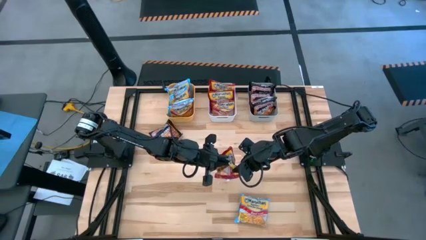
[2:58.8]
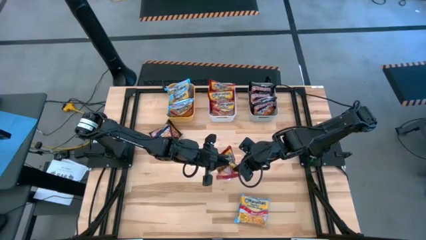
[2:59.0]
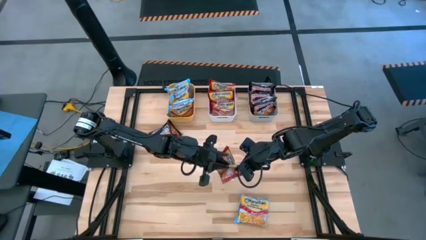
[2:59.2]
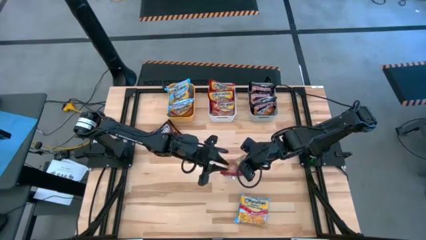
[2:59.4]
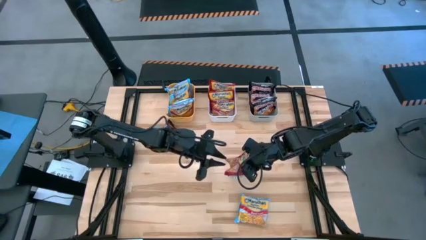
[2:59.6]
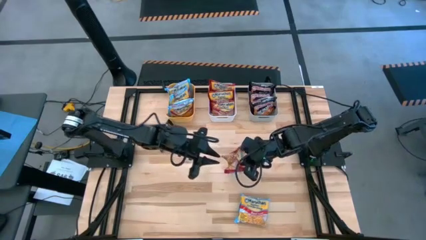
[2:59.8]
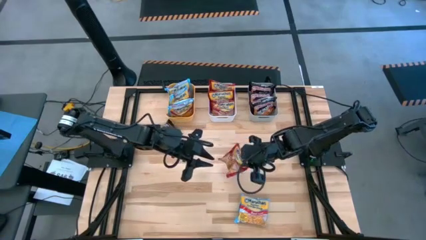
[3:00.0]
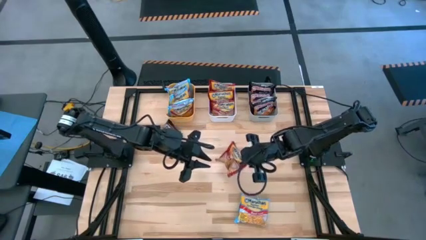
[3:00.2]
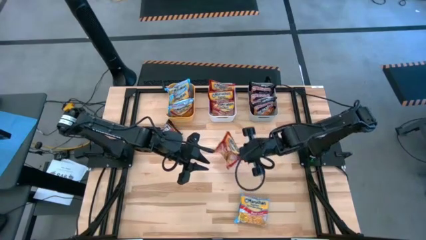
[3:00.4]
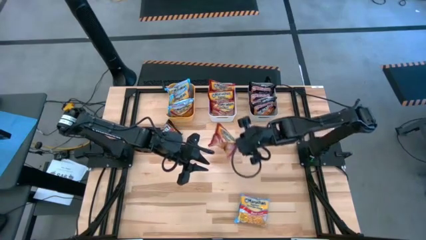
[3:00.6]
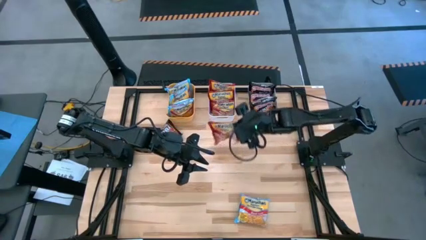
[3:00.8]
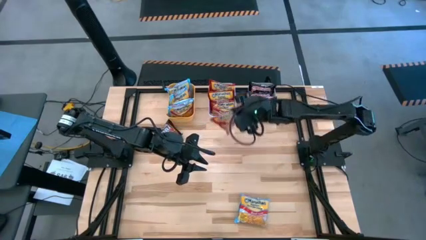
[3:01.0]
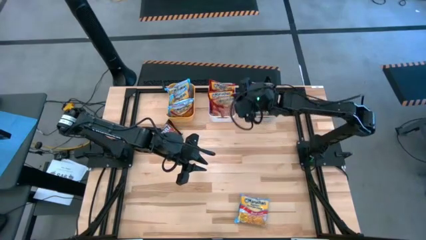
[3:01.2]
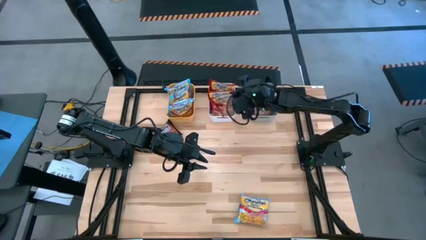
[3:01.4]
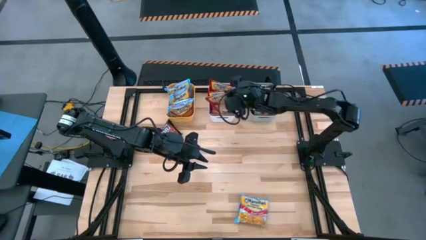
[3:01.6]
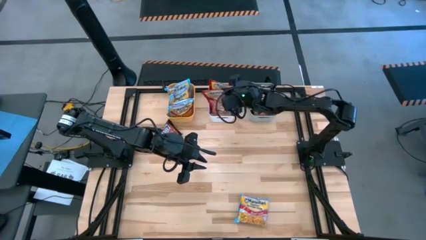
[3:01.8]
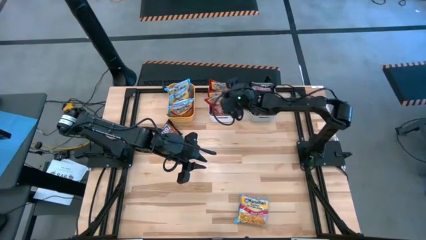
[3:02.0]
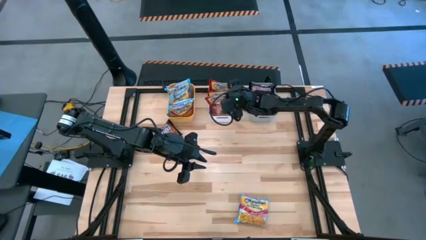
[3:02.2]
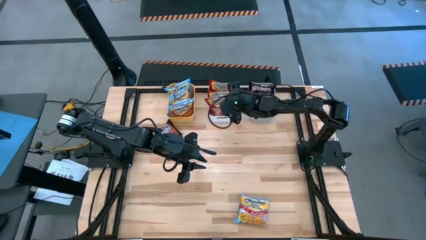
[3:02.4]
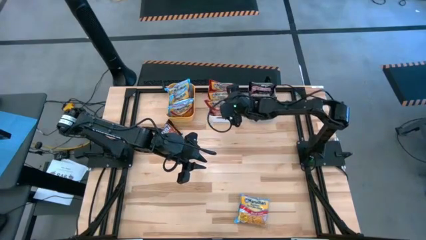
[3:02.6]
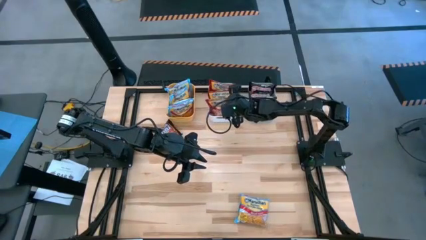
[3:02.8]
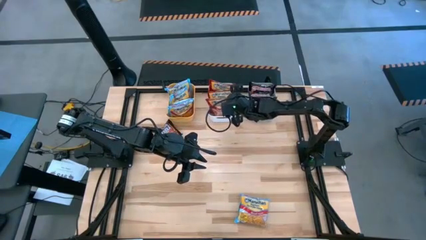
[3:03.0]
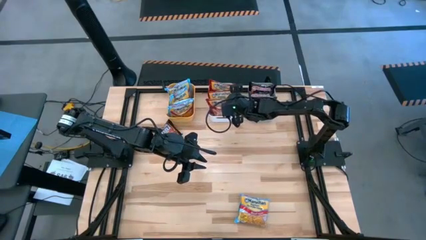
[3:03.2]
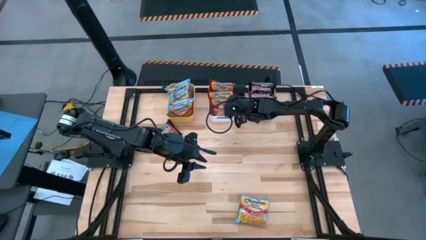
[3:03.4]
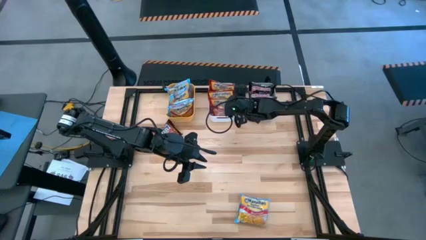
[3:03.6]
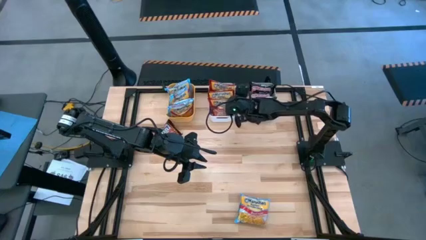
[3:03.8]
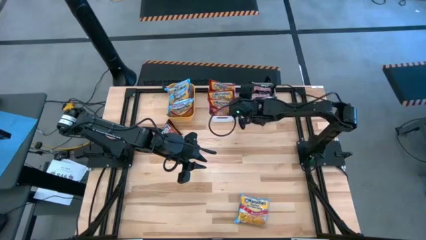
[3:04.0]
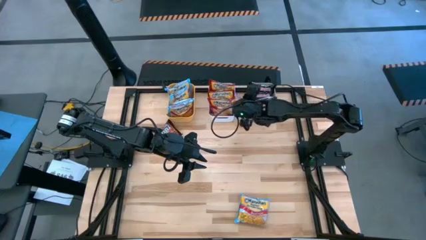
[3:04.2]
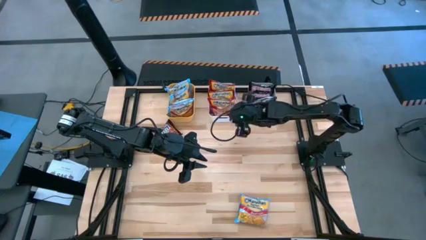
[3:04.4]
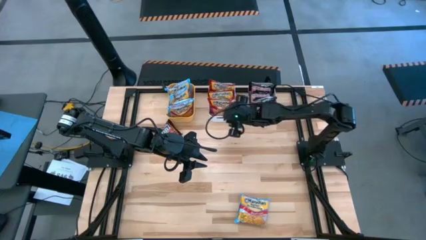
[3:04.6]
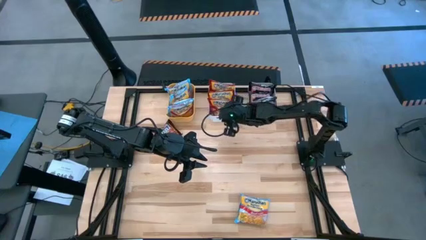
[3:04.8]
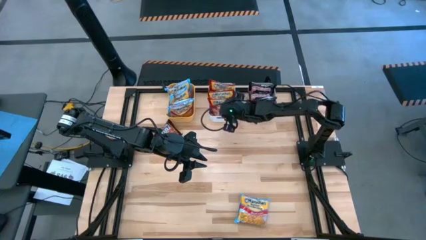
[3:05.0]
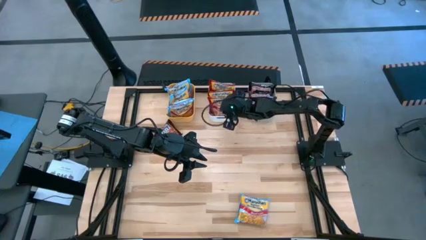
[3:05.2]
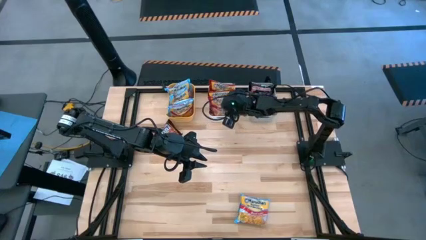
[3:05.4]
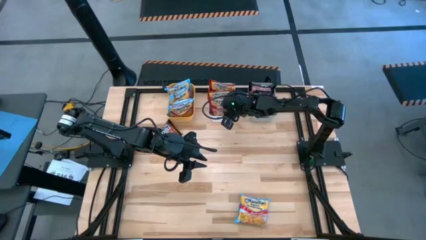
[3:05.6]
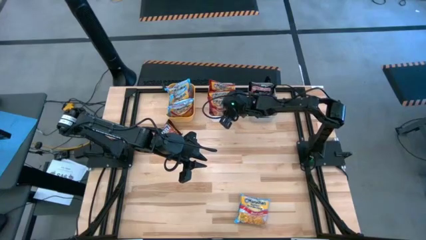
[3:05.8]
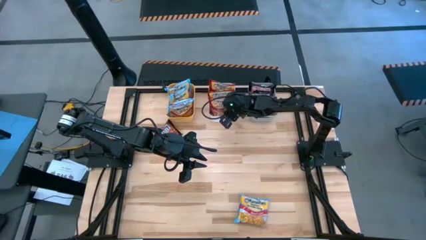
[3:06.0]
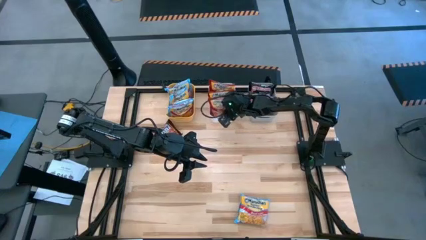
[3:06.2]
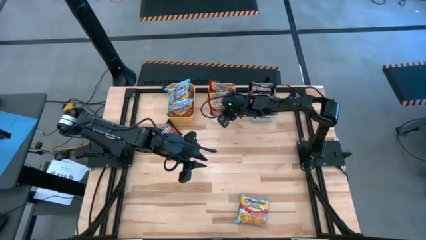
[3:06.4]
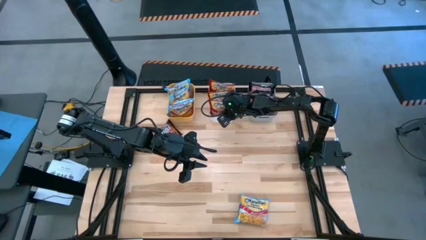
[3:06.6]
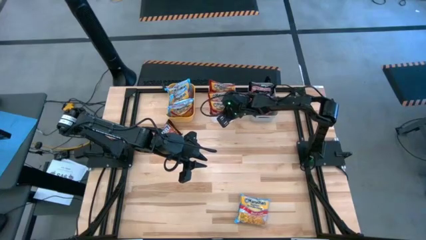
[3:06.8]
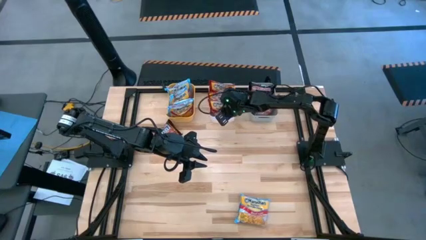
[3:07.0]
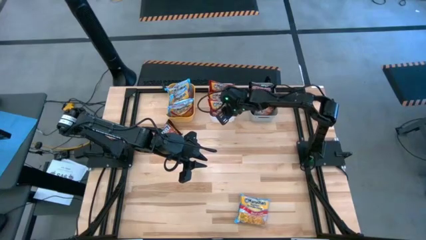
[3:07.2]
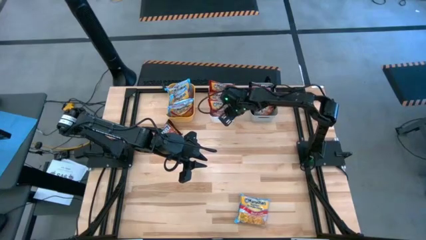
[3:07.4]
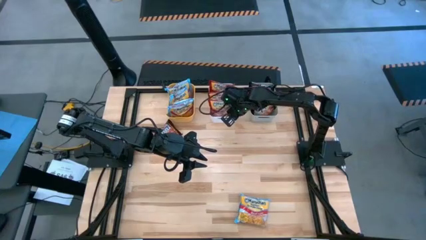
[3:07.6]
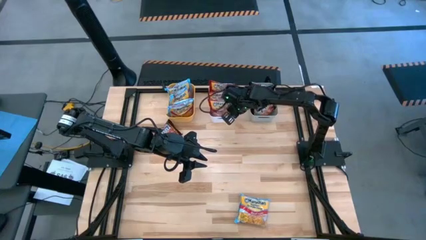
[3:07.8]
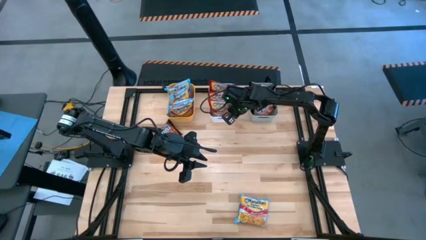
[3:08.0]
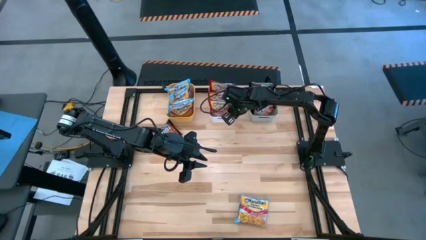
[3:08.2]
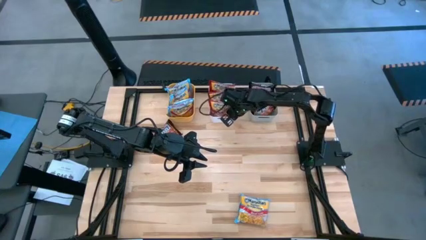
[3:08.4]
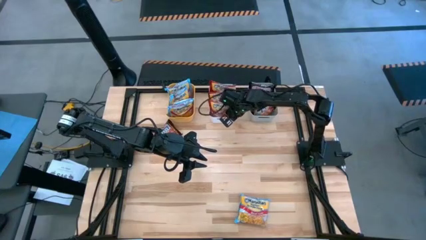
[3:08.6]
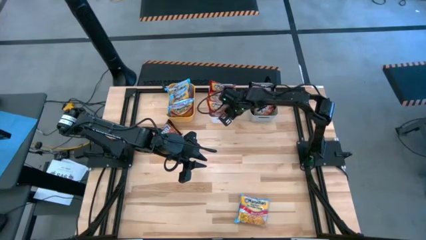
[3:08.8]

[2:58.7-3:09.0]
Task: Sort Maruchan noodles
Put the red noodle pack into the white bin

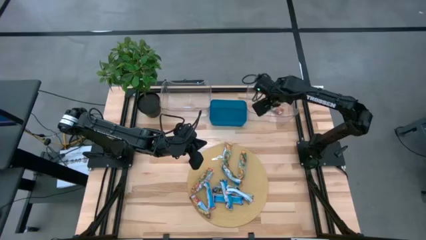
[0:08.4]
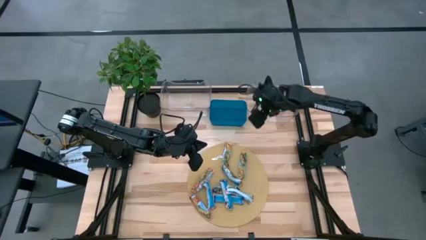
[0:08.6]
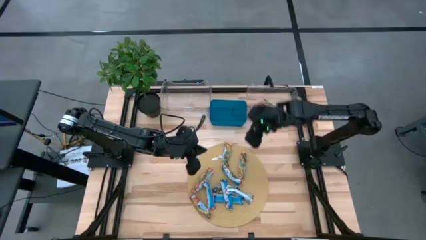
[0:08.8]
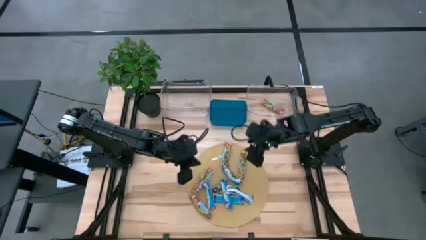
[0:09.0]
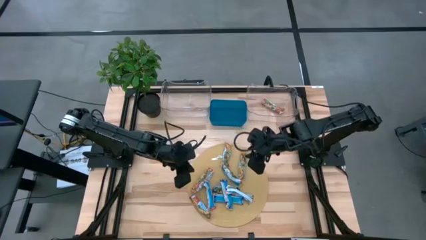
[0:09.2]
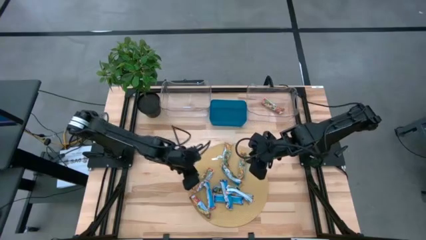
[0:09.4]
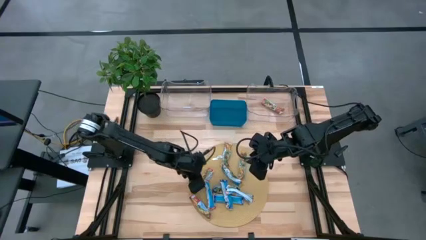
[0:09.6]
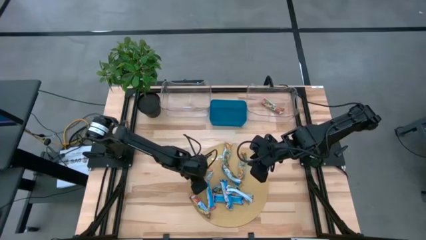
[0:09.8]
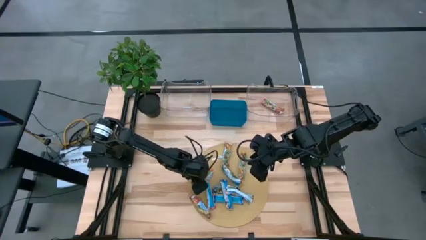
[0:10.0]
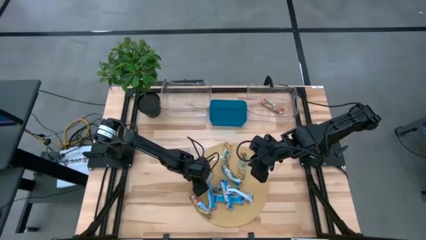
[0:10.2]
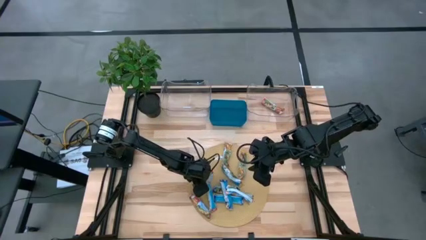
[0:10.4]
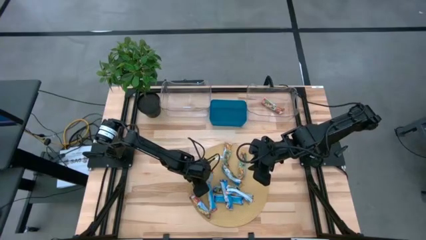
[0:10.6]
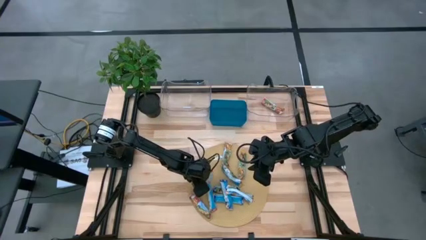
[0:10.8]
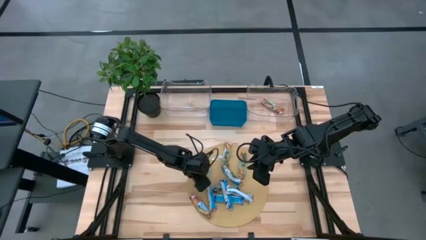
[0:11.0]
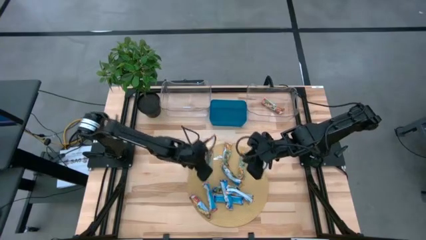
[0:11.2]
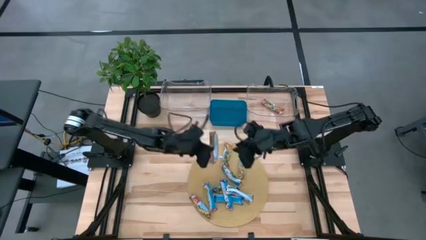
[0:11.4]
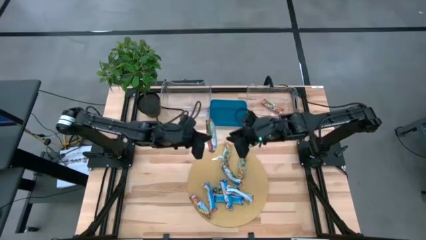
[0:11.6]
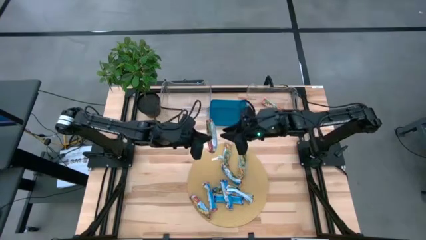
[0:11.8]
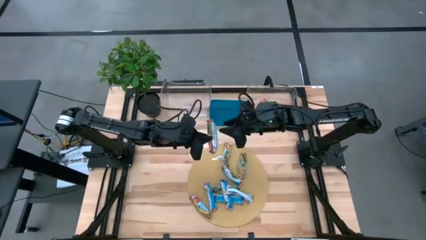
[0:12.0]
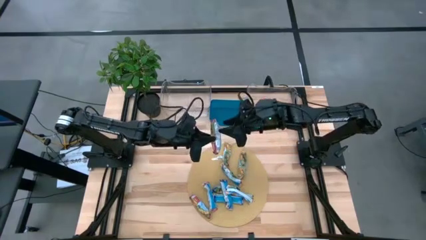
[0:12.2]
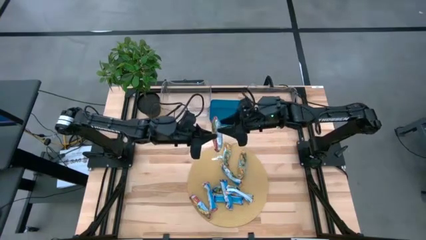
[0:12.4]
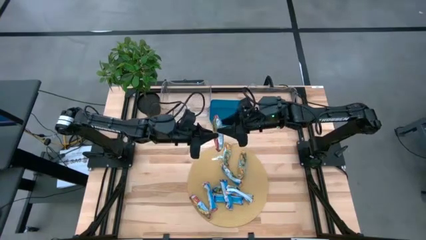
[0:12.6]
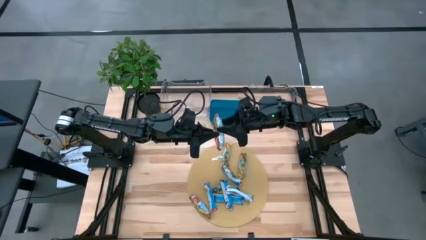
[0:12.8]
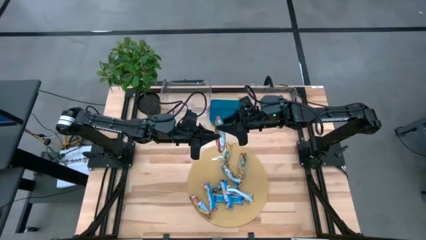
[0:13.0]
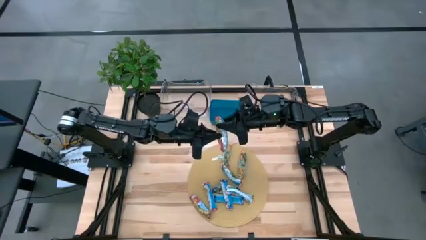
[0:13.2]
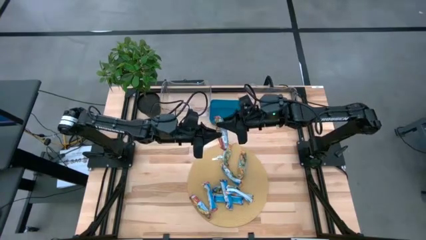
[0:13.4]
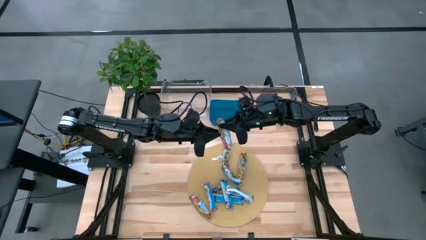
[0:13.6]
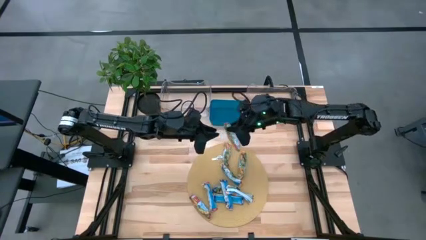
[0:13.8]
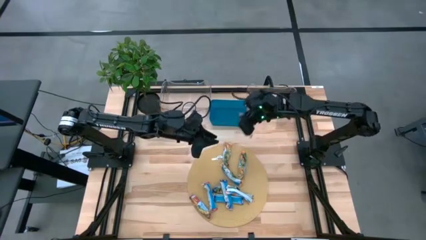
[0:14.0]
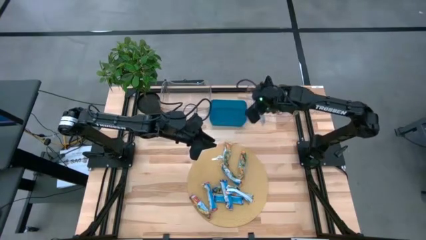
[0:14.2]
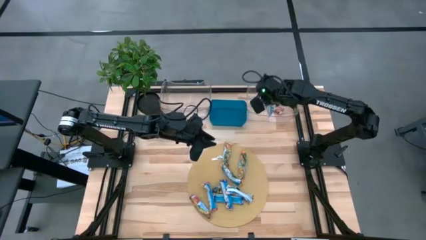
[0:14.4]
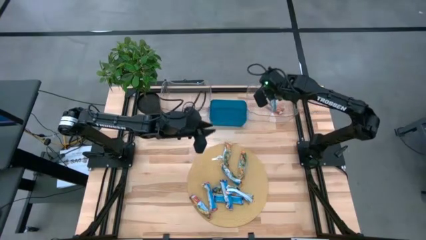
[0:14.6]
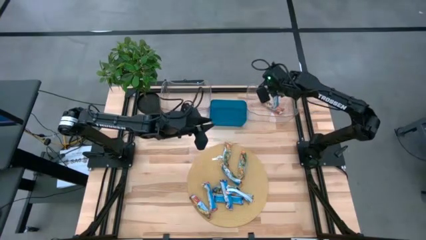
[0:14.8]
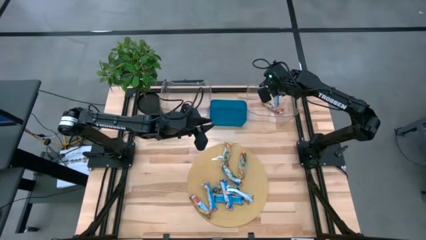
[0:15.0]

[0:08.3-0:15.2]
Task: Pick and place Granola Bars by type
Put the red granola bar into the right transparent bin
